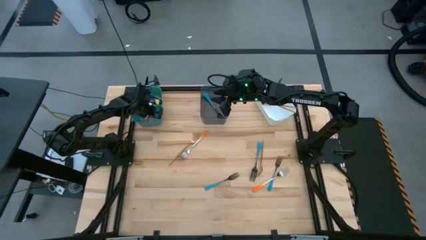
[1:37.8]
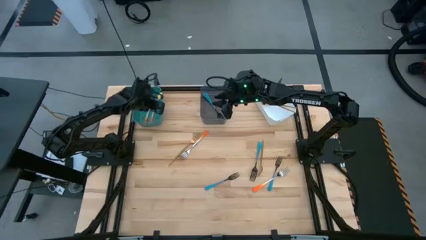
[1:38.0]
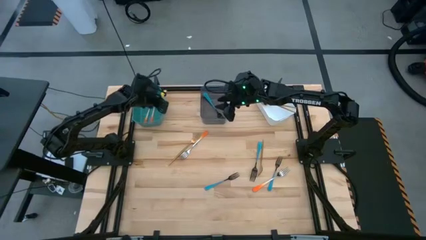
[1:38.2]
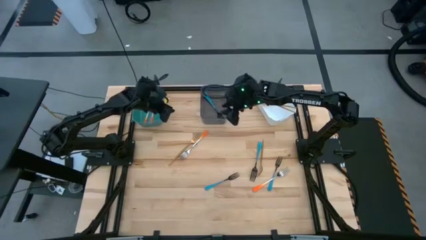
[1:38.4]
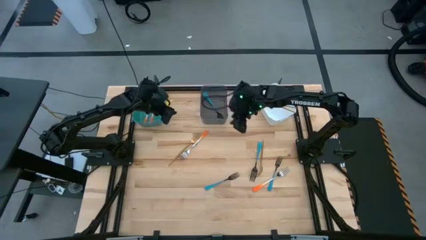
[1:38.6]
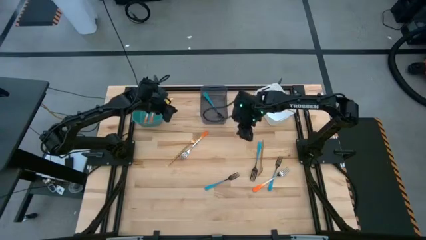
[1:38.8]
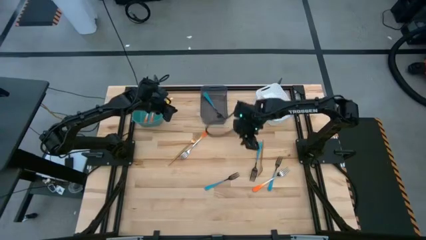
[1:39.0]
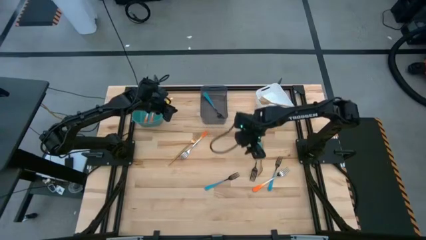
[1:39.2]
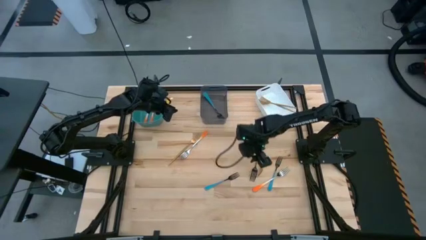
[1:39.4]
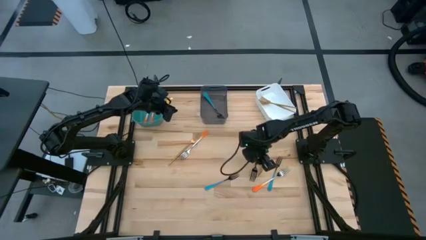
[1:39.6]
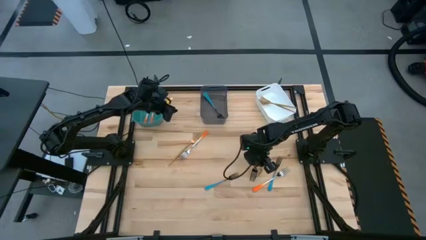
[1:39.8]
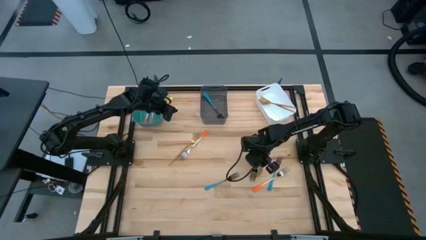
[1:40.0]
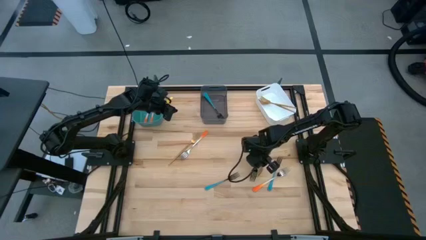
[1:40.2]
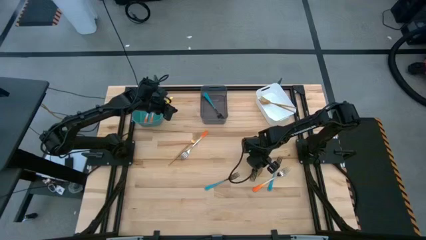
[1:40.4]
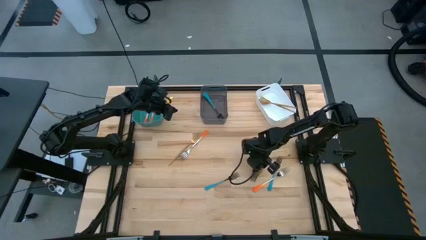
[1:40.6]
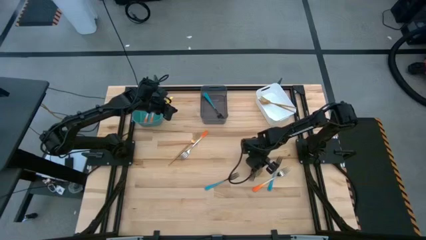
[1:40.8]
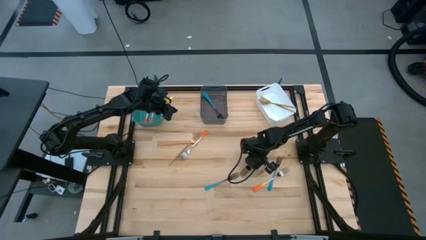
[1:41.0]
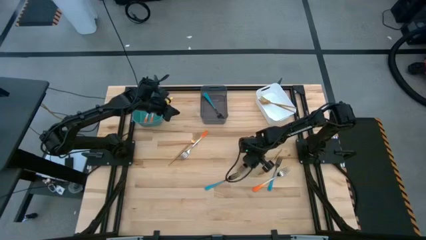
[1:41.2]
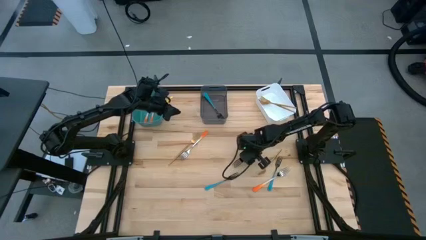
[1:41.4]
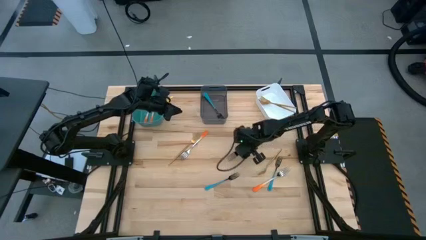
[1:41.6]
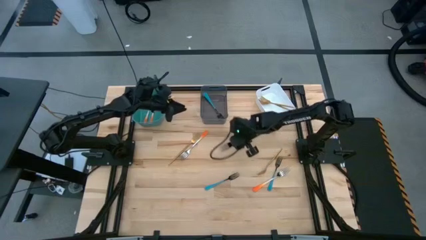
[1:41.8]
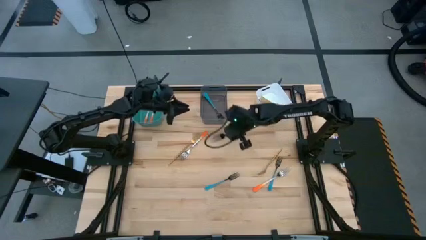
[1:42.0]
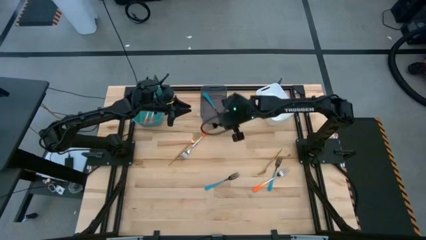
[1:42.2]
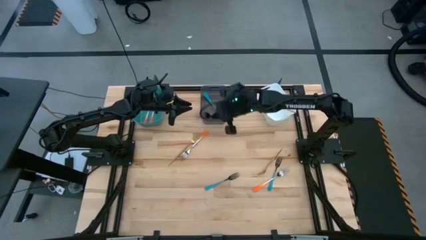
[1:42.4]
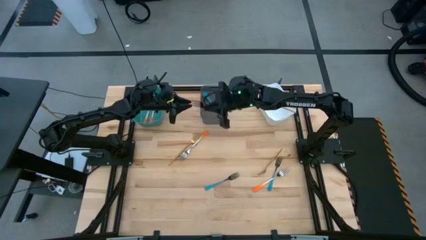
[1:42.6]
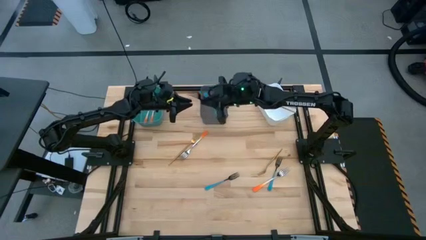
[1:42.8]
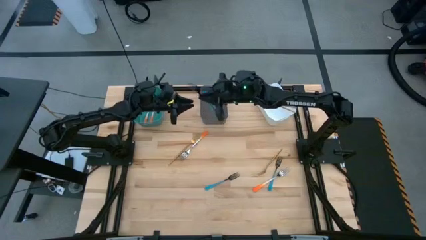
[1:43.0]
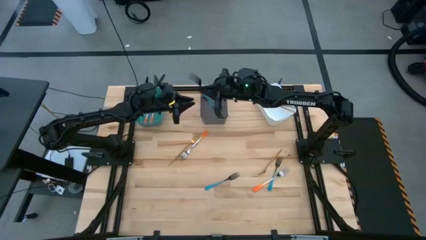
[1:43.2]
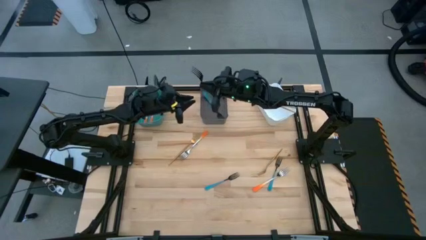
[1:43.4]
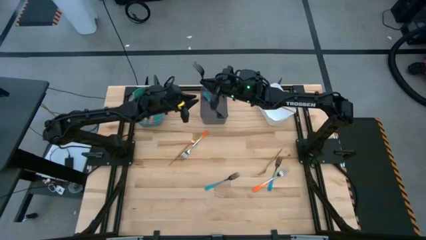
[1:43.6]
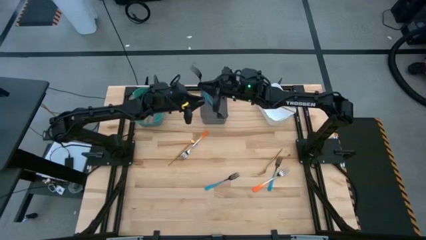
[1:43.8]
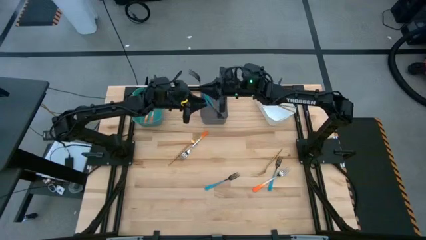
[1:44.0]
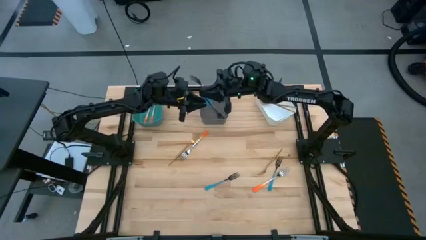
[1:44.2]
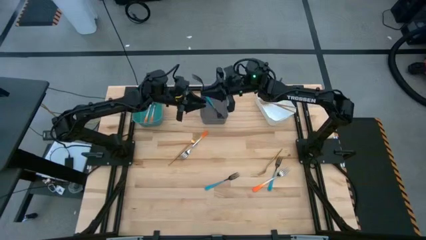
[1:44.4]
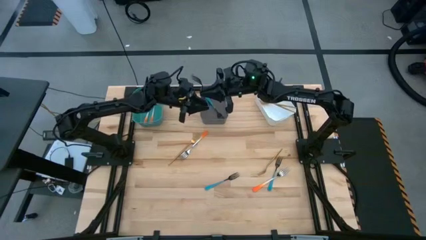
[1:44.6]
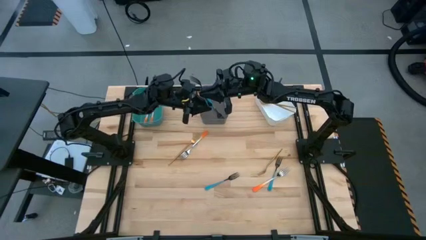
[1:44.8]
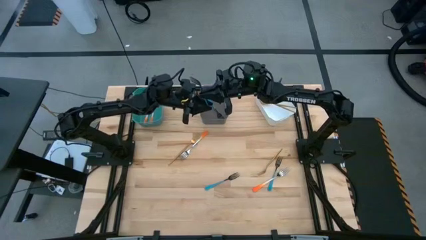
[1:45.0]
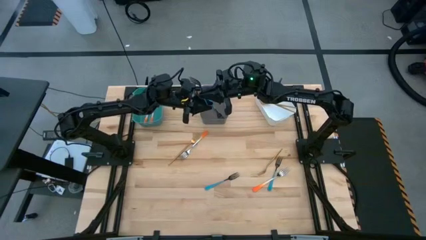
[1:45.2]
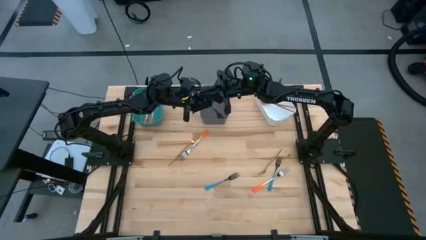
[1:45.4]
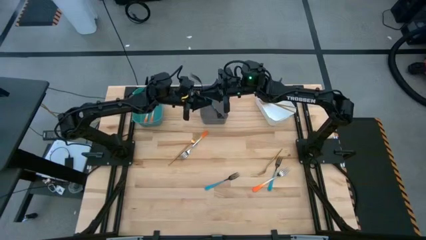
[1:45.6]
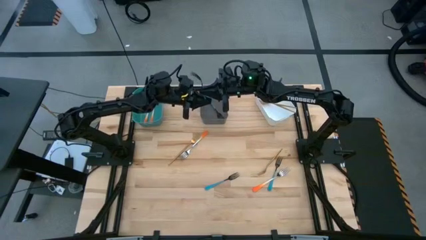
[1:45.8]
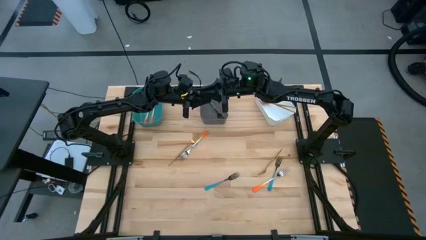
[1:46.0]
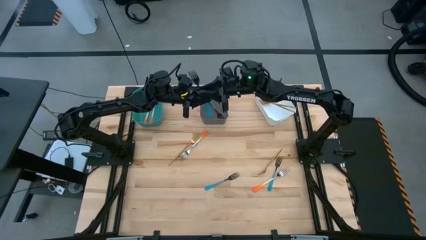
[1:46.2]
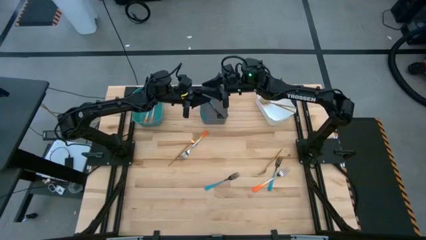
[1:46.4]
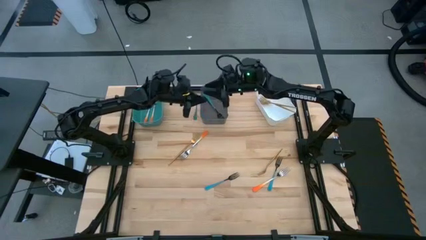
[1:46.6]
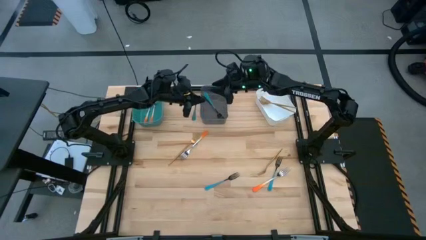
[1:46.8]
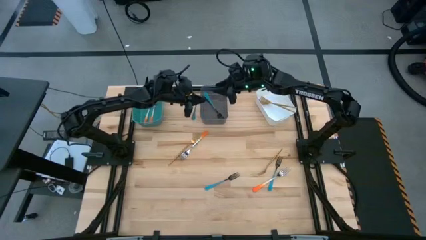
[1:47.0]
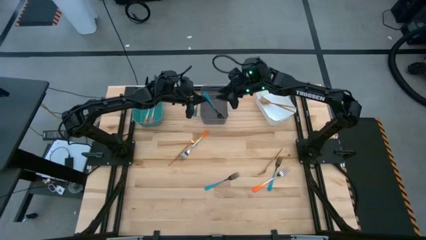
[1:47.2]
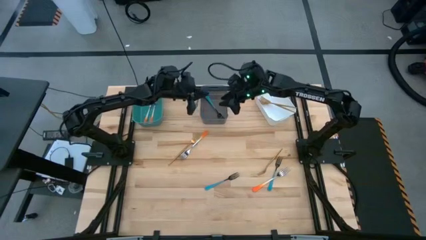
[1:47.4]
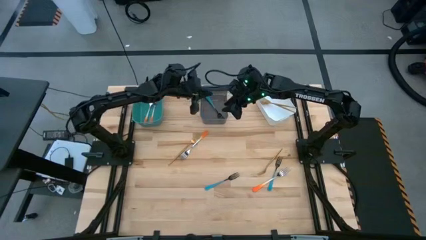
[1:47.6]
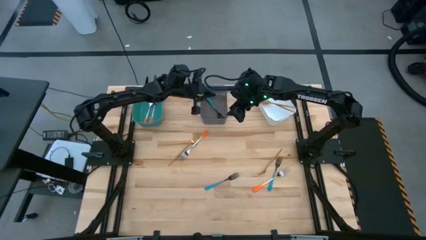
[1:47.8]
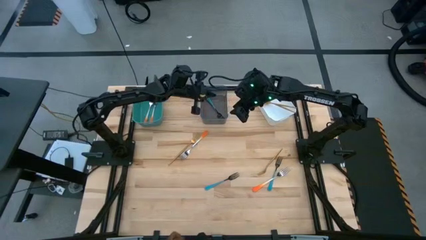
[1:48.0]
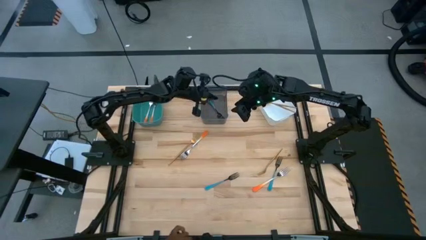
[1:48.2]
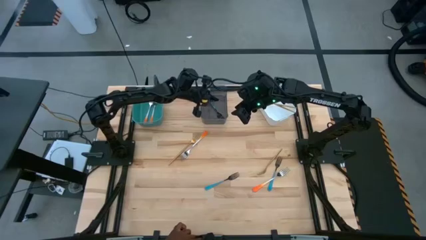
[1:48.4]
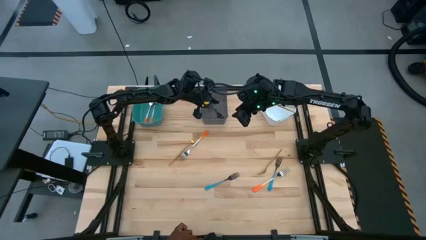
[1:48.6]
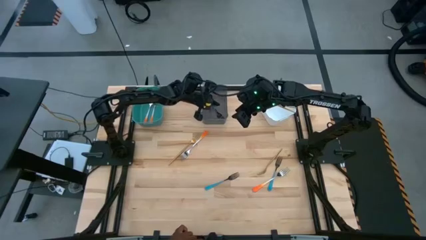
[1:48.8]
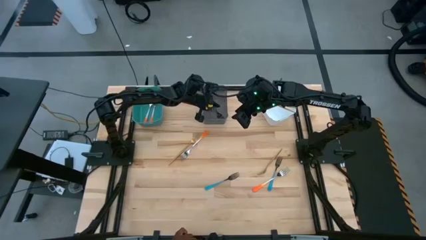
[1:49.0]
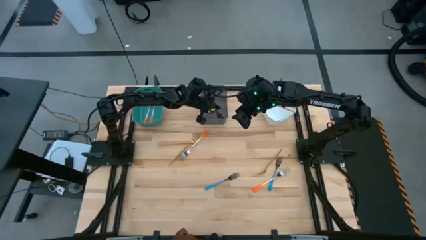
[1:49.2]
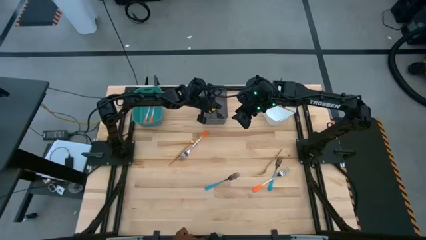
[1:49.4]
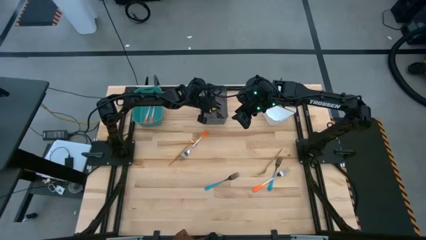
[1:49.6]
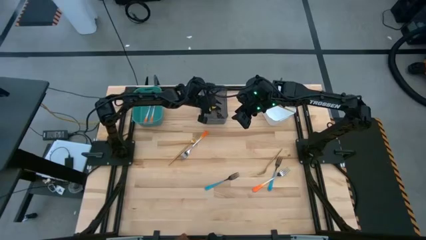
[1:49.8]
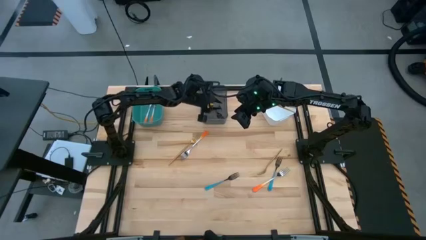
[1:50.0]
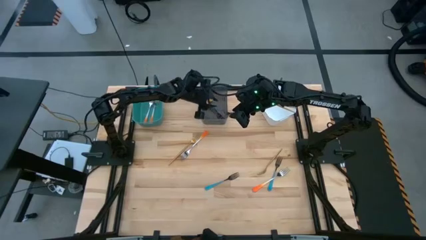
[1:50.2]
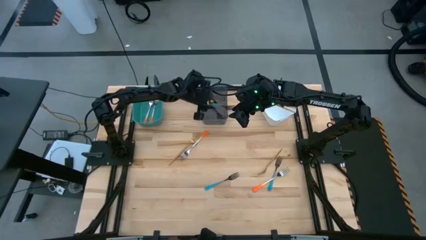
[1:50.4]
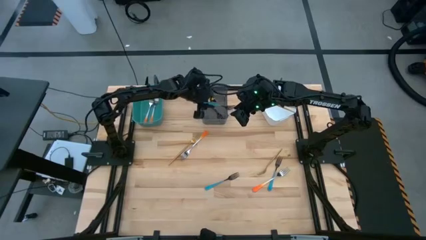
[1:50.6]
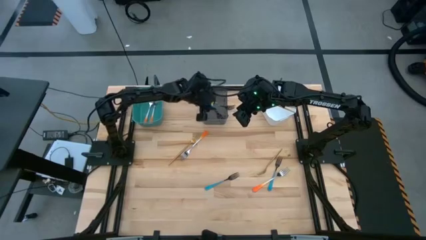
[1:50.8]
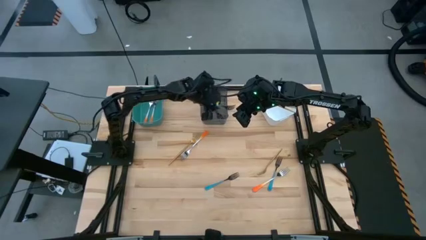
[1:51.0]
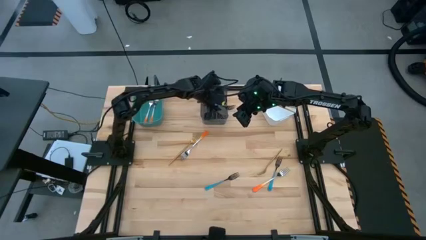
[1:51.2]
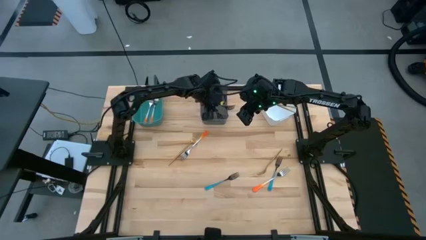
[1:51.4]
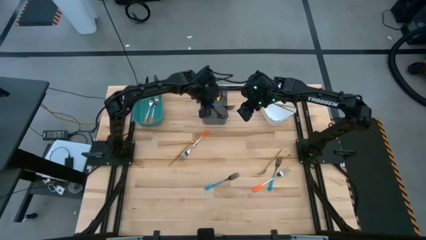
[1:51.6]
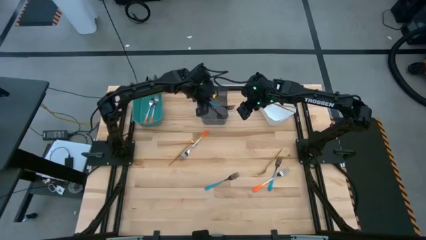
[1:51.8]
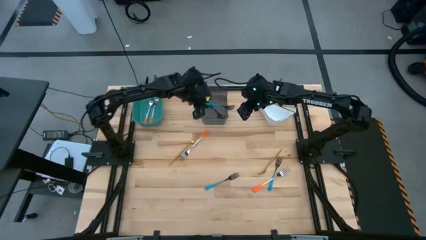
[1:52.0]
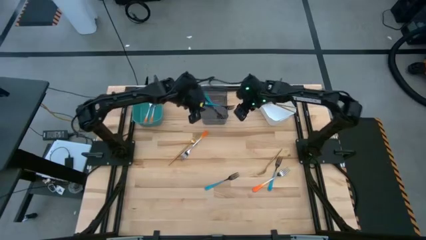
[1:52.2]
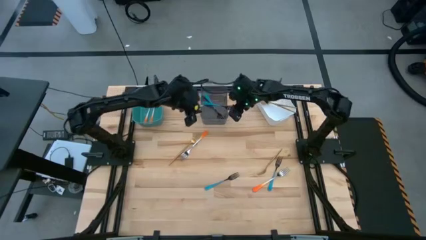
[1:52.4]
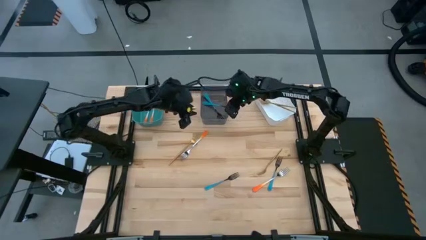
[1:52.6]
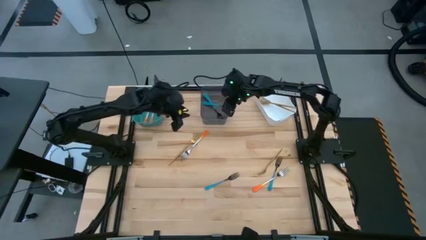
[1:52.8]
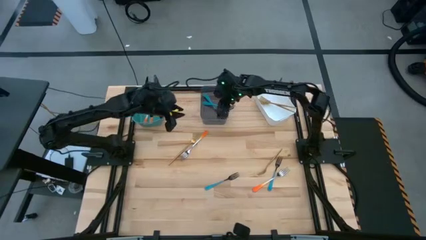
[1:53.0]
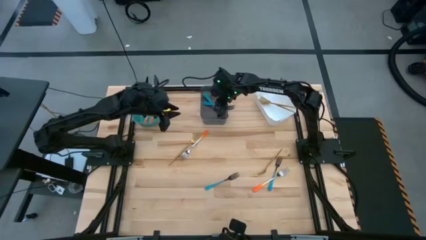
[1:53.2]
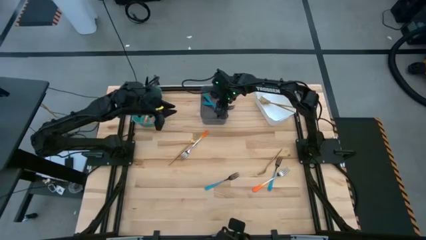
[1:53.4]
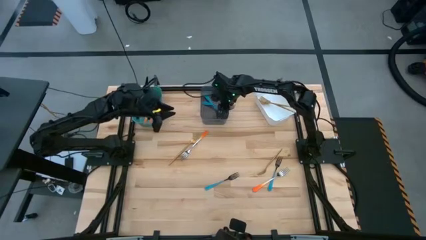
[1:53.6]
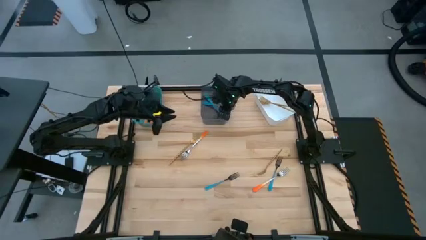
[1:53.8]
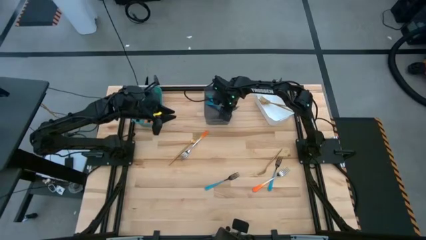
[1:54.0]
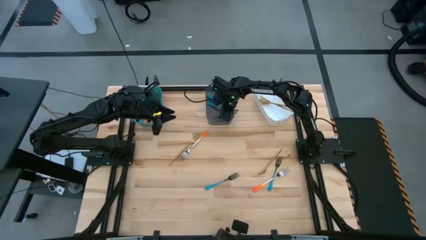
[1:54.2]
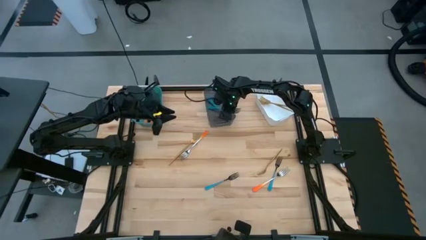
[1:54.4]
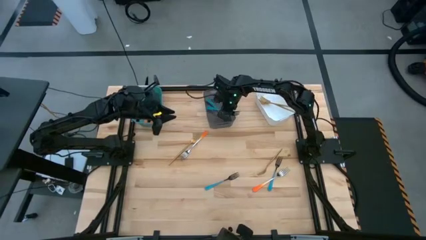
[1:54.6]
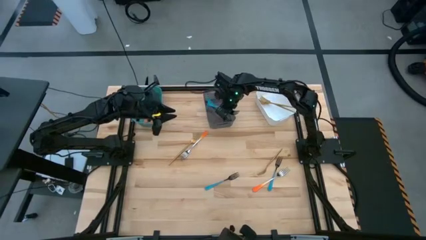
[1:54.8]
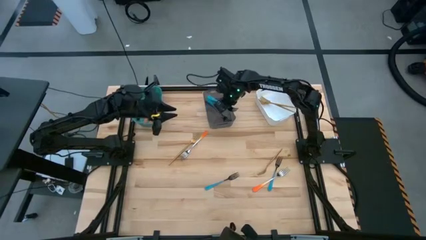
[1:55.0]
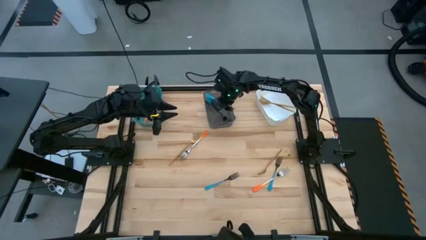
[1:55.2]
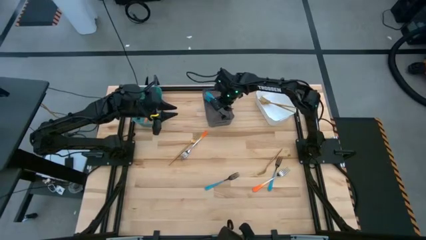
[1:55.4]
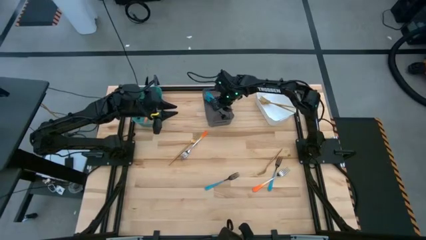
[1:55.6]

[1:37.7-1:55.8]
Task: Sort silverware by color (type)
Put the top blue fork into the black bin
